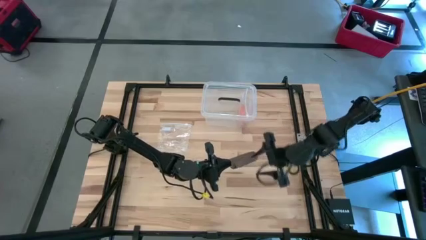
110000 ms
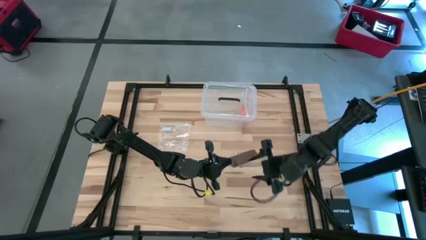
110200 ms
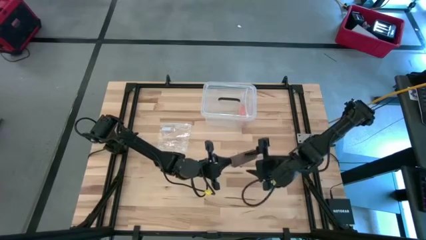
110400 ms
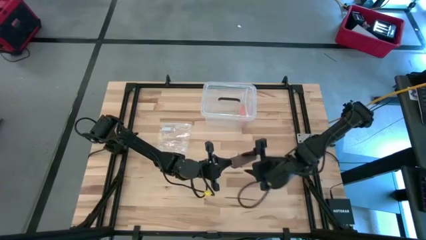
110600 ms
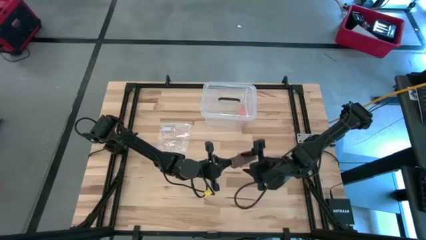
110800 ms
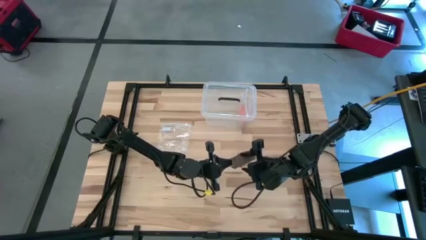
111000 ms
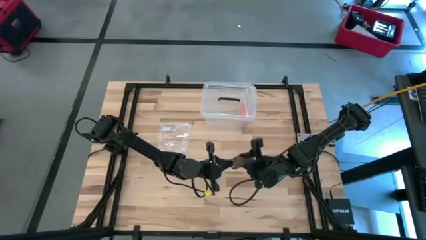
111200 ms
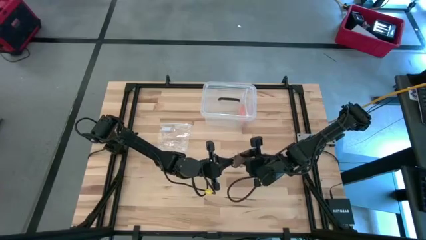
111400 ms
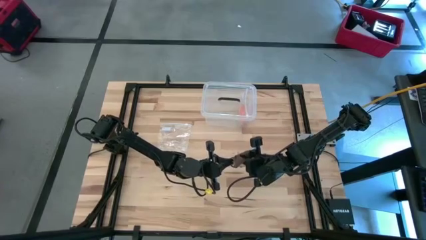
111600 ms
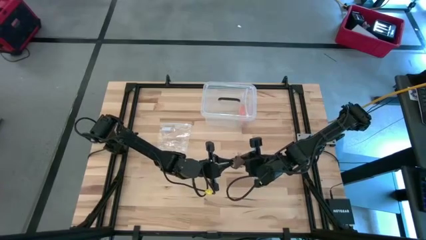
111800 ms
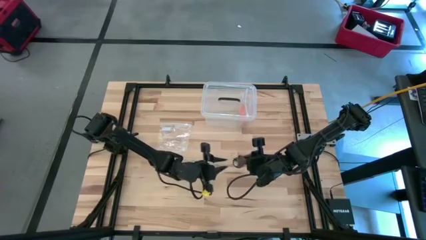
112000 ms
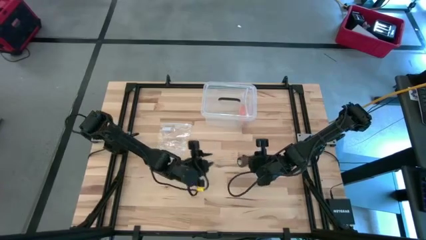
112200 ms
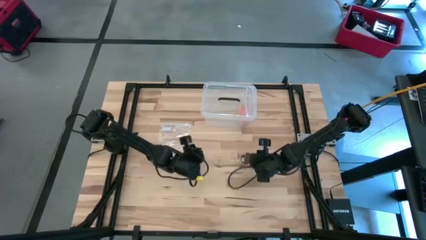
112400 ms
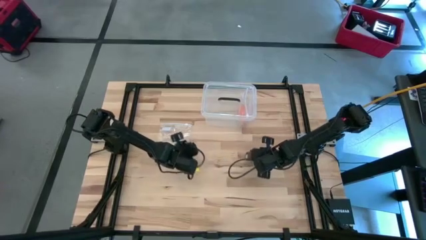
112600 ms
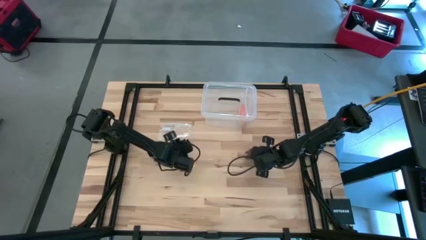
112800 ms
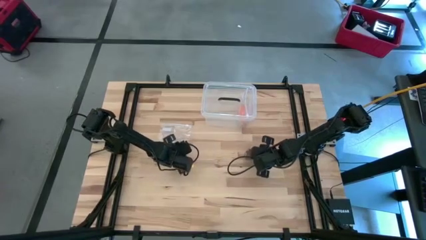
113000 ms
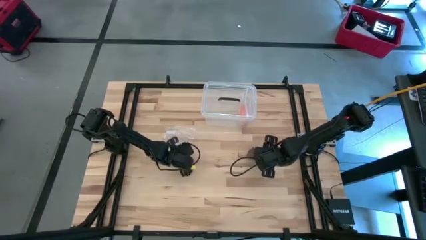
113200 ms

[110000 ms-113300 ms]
Task: Roll bandage
Roll the brown bandage

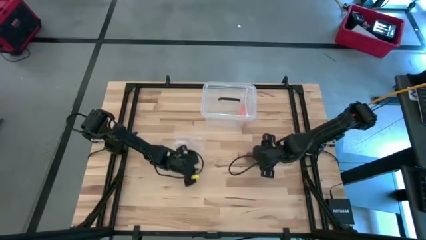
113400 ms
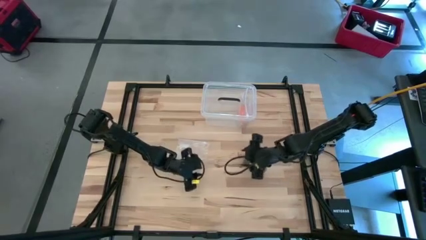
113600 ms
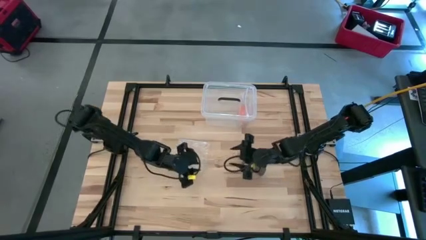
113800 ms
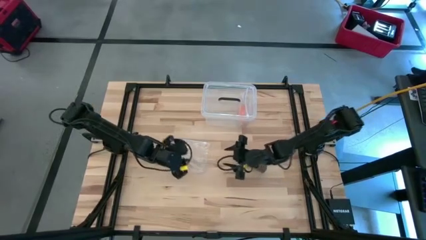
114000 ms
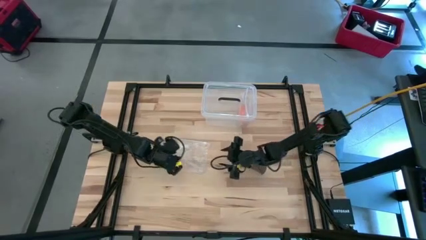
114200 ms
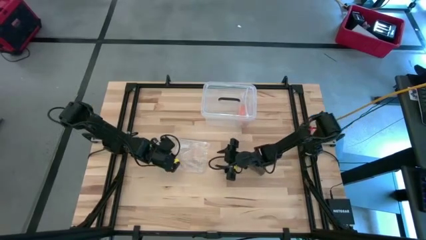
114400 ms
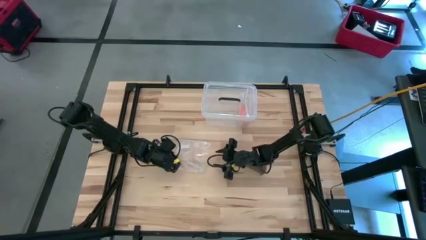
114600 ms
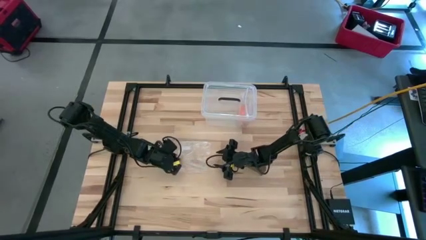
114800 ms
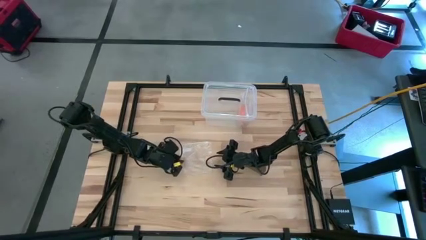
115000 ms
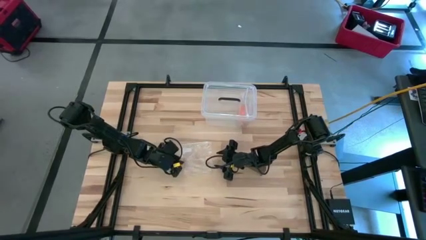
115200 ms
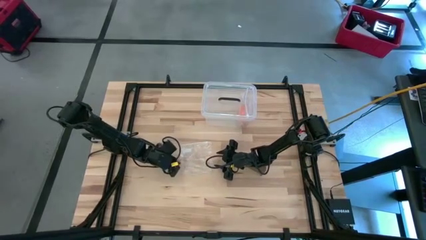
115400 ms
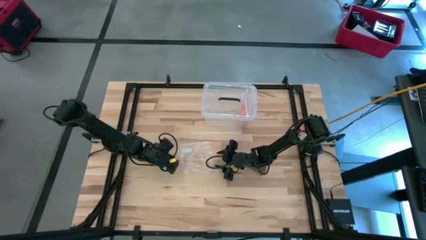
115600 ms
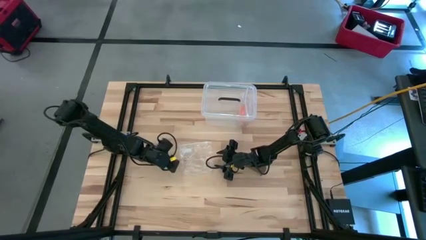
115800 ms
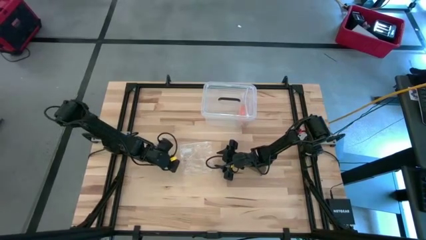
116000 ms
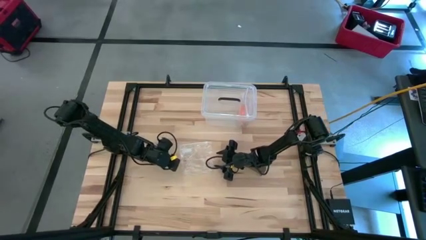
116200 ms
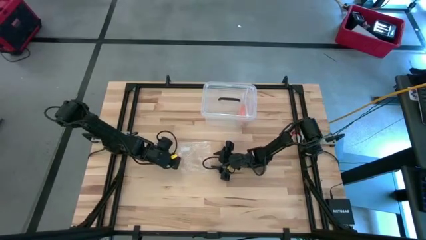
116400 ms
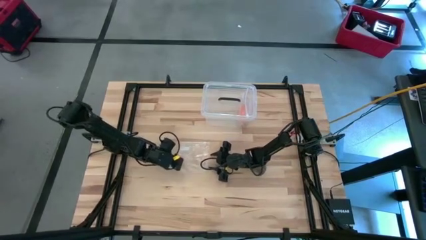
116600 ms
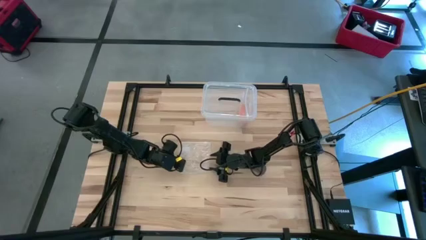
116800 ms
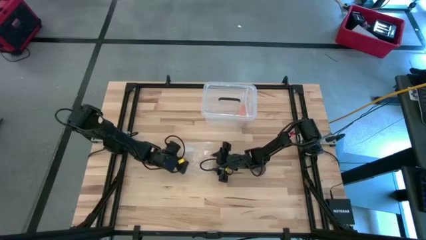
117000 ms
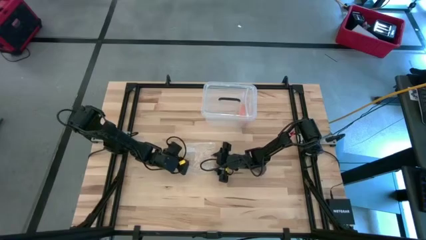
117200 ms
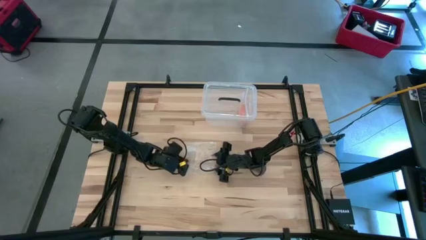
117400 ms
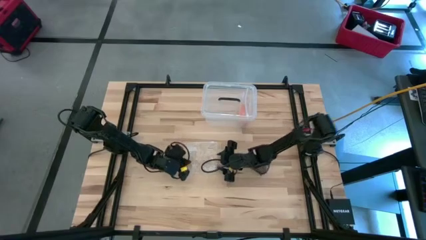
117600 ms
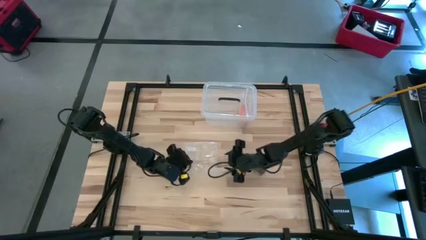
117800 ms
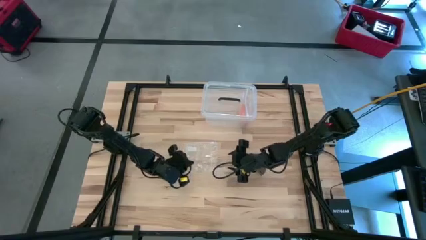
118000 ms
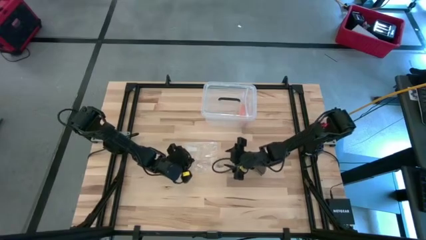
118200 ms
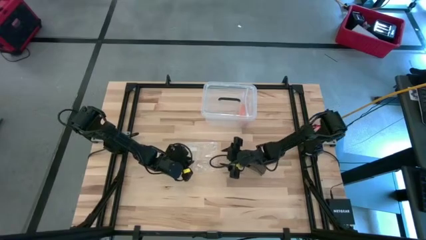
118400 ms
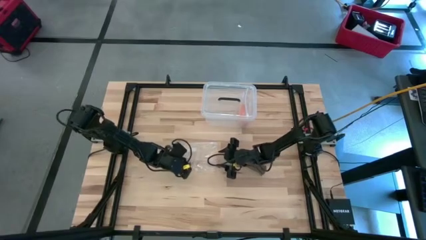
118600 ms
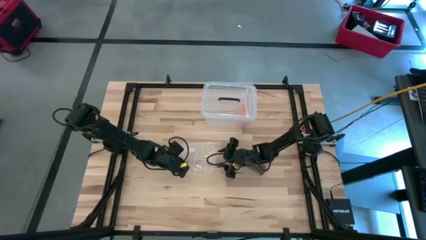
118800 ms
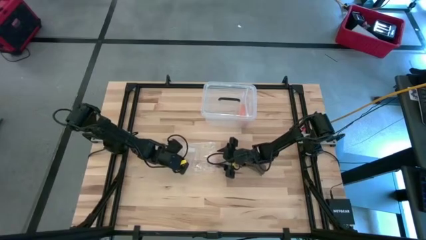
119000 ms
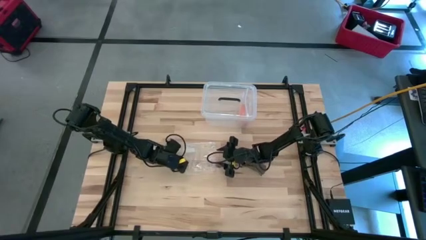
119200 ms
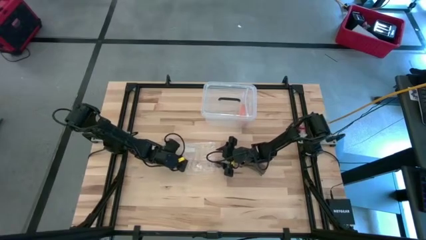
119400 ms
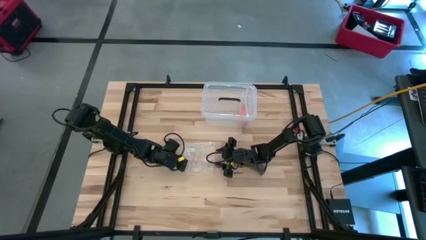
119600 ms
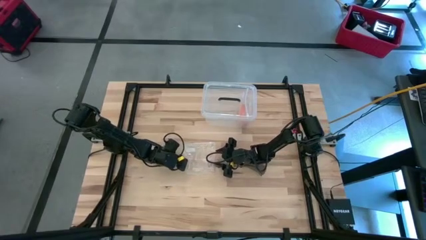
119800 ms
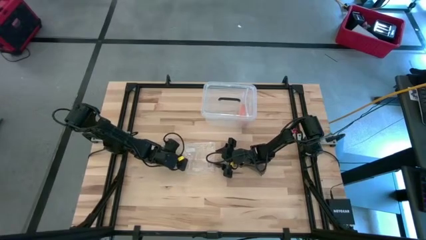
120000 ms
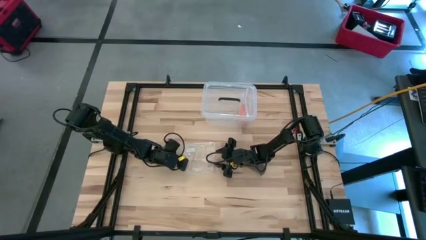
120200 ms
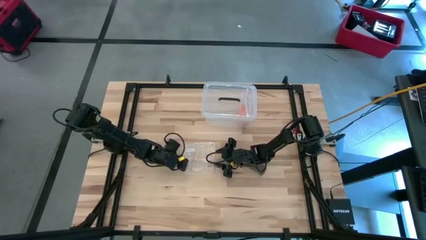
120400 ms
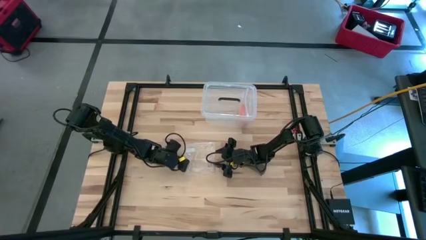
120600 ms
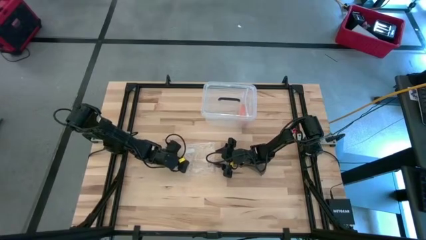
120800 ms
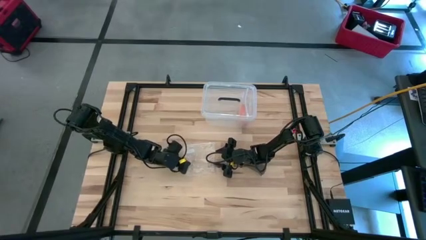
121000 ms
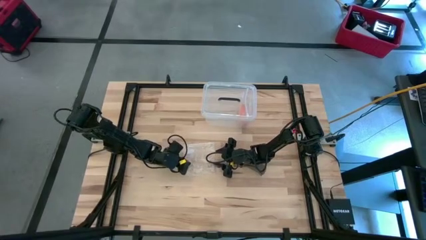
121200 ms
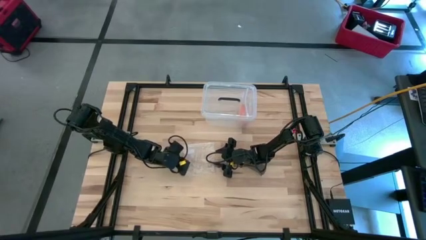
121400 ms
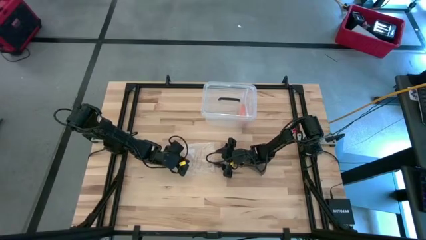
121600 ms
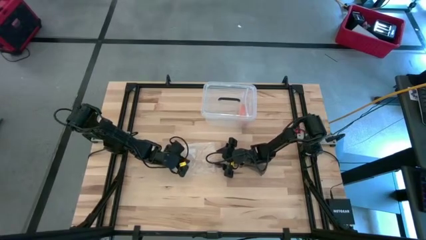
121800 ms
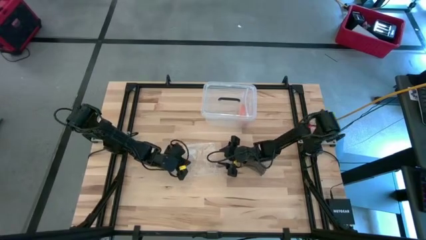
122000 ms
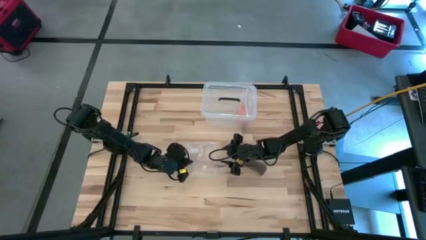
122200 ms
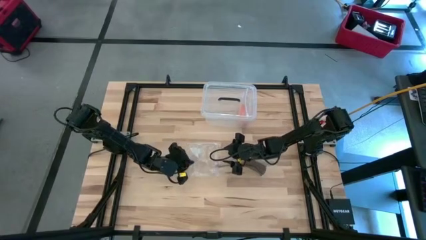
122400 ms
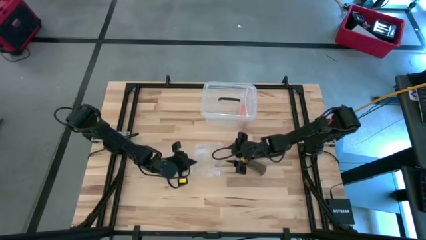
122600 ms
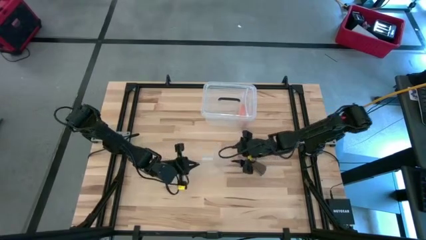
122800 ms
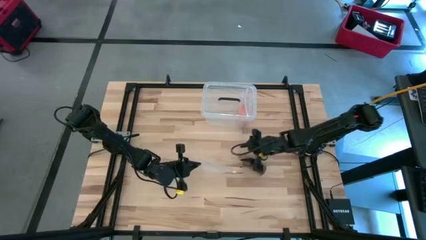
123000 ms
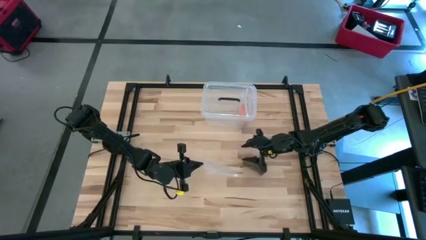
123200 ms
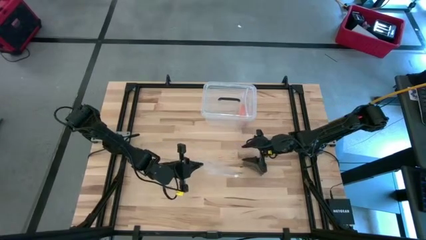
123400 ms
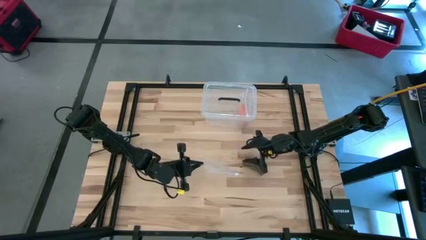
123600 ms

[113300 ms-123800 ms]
Open the transparent zip bag

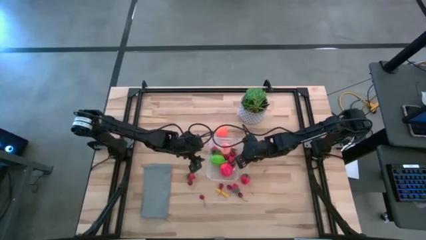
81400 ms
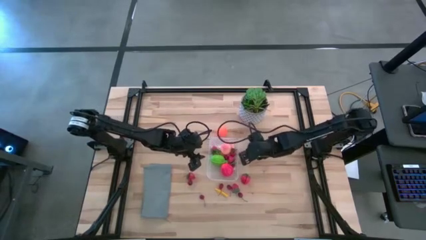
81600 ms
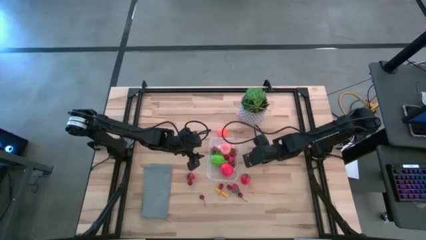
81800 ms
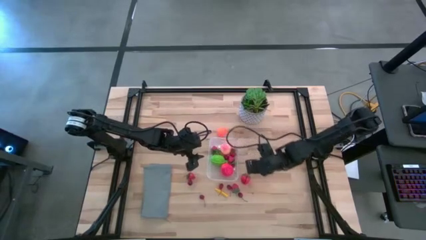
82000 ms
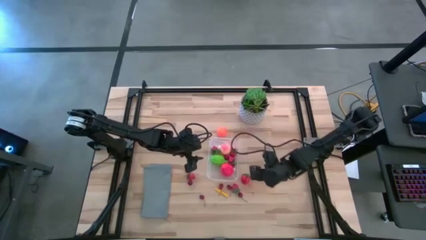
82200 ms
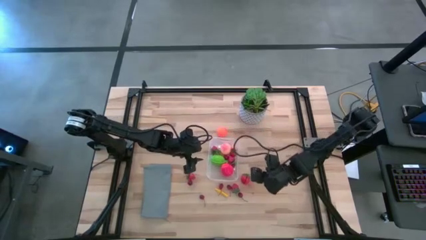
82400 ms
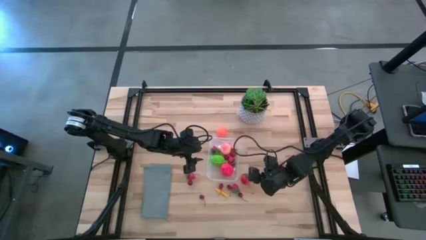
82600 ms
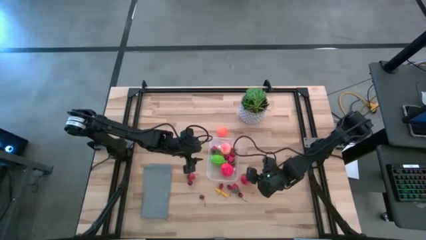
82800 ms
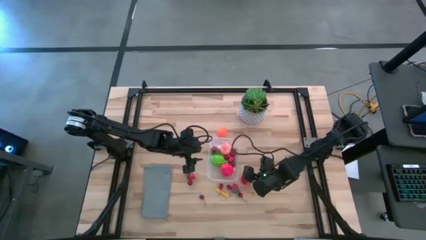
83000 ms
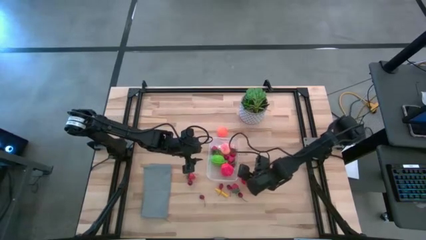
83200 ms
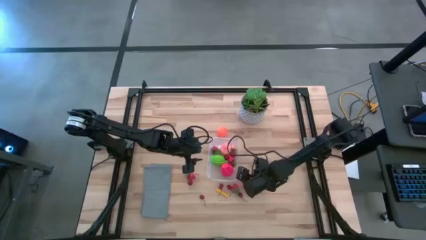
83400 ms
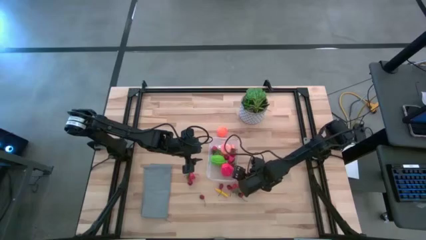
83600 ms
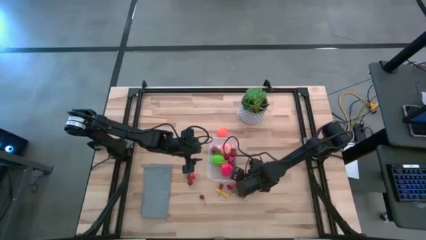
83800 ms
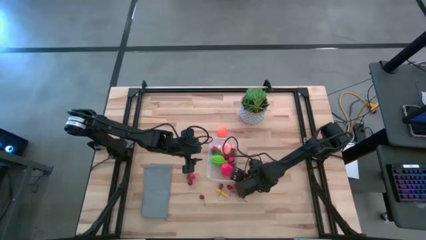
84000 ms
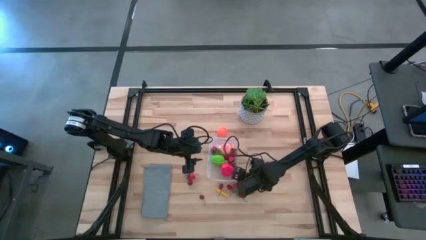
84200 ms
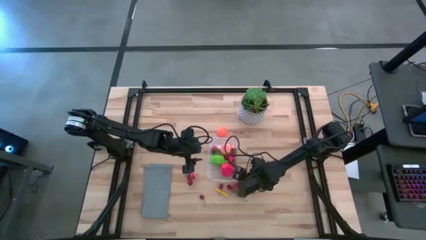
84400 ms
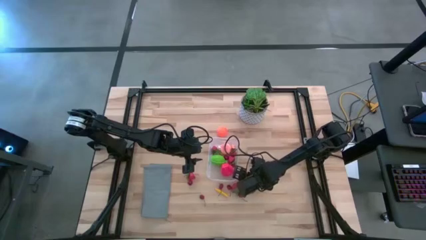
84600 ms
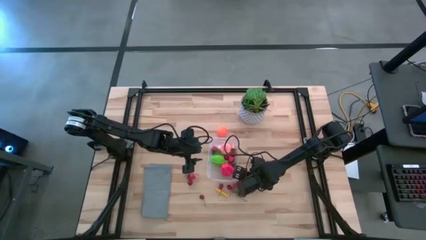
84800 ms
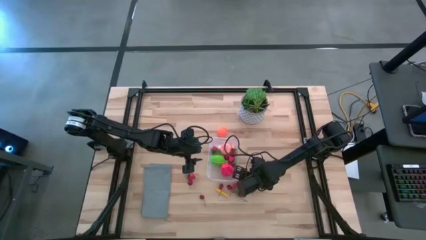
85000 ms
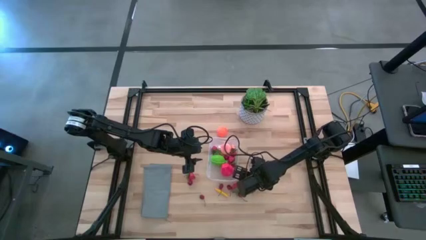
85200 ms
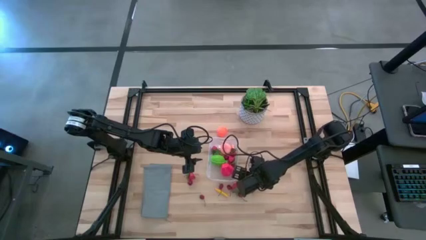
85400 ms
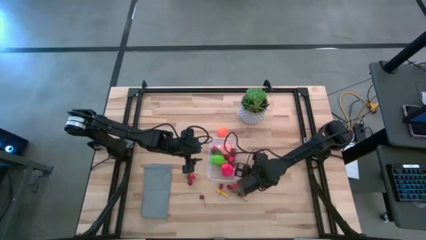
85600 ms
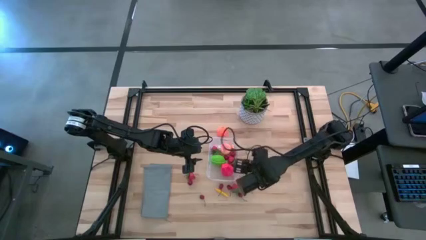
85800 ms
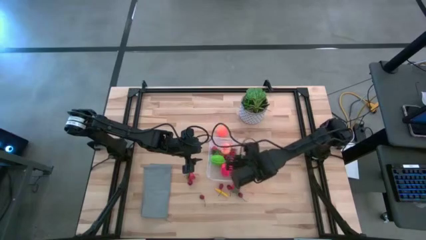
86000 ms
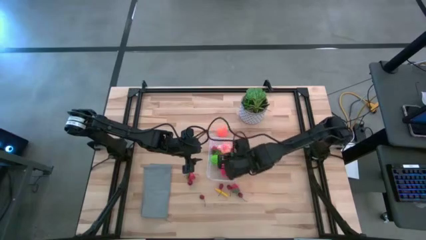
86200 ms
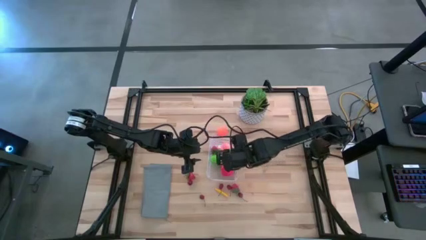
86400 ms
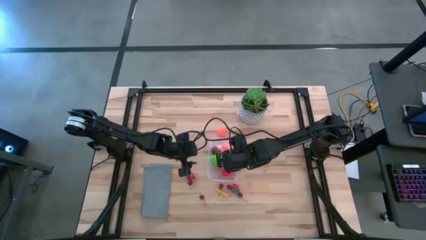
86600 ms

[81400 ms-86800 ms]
Task: Pick and placing Produce into tupperware
Put the red strawberry into the transparent bin
